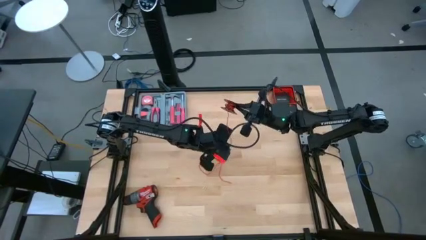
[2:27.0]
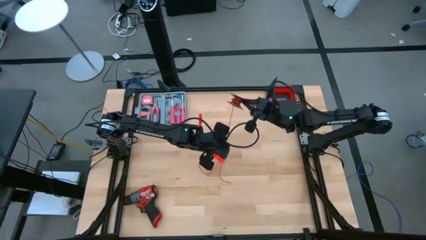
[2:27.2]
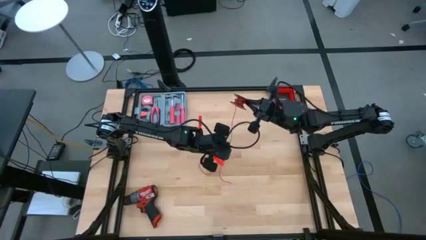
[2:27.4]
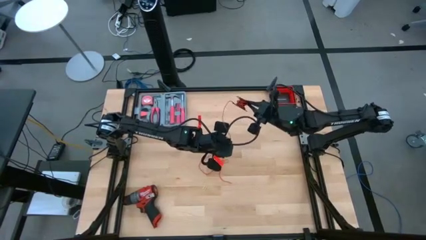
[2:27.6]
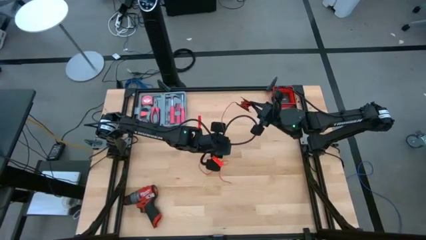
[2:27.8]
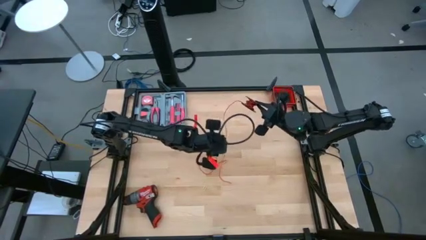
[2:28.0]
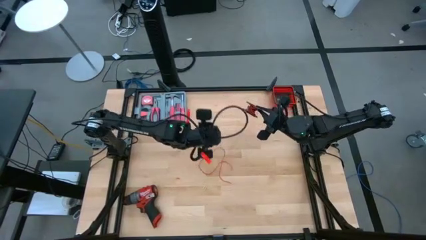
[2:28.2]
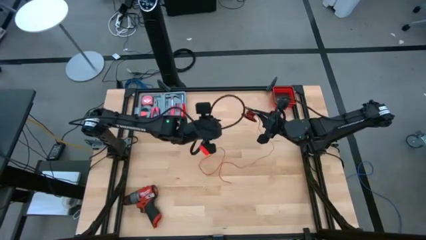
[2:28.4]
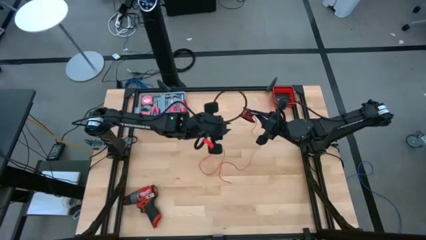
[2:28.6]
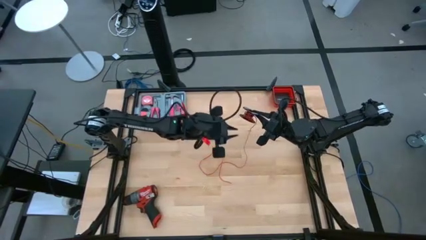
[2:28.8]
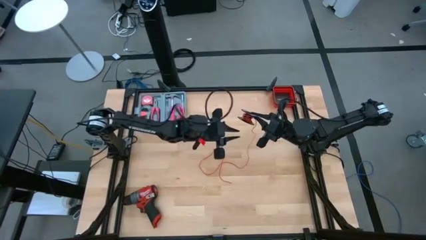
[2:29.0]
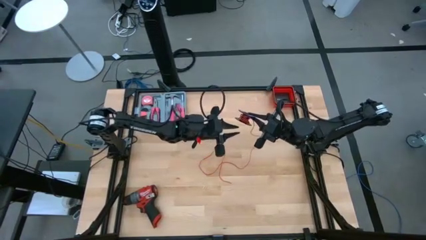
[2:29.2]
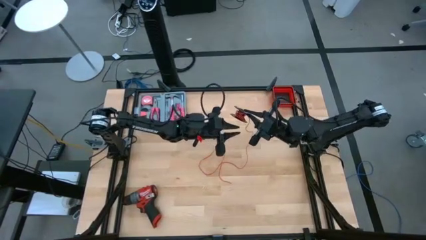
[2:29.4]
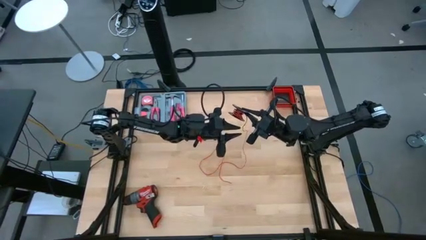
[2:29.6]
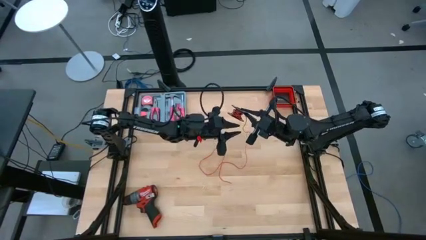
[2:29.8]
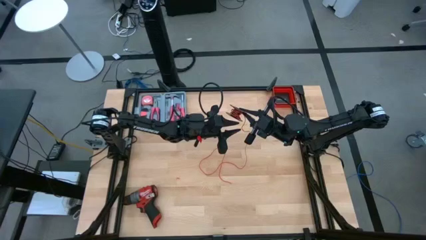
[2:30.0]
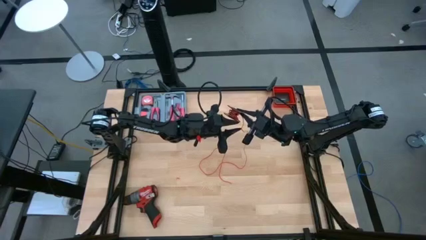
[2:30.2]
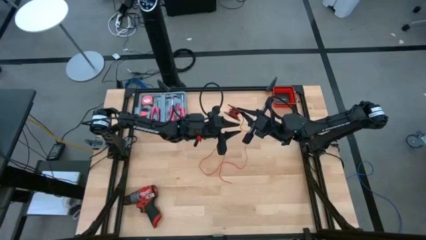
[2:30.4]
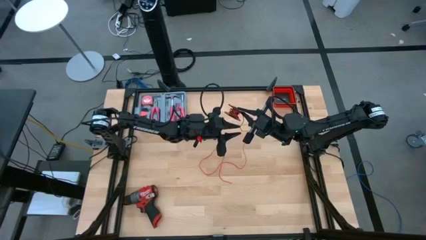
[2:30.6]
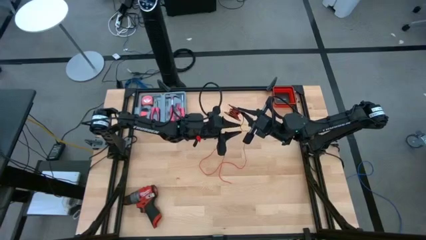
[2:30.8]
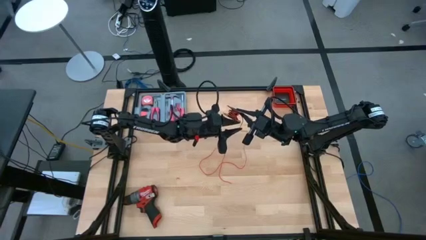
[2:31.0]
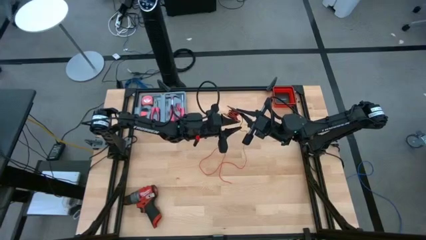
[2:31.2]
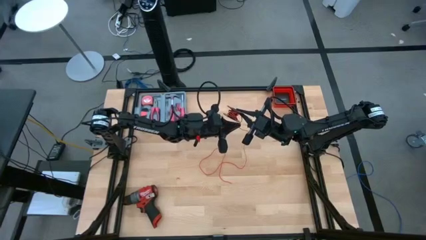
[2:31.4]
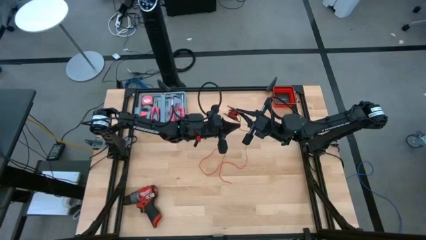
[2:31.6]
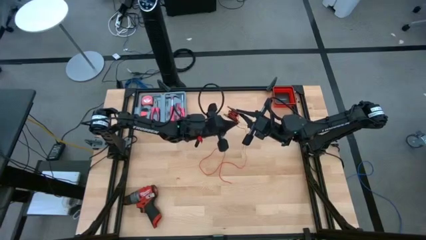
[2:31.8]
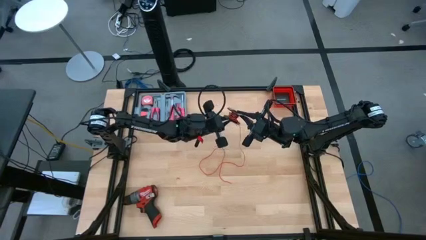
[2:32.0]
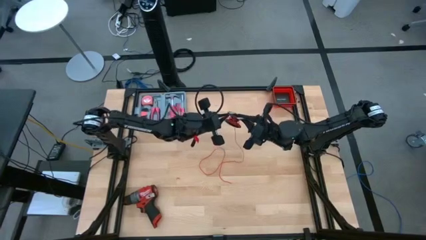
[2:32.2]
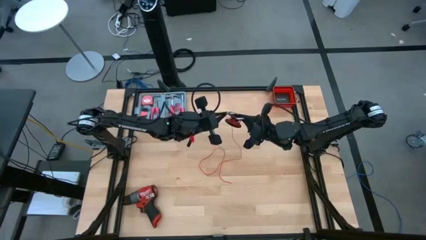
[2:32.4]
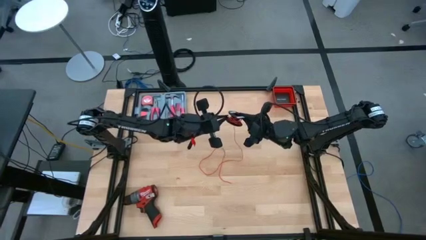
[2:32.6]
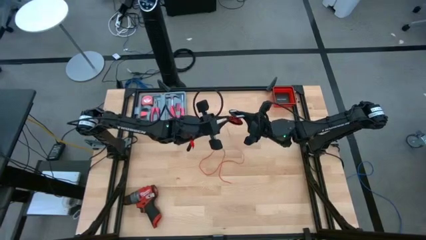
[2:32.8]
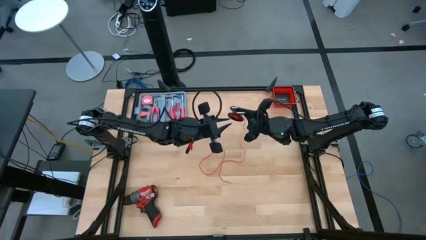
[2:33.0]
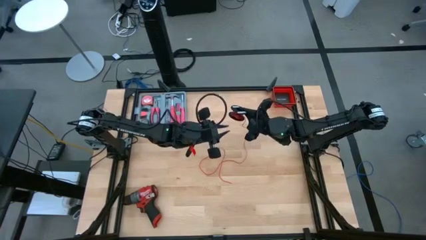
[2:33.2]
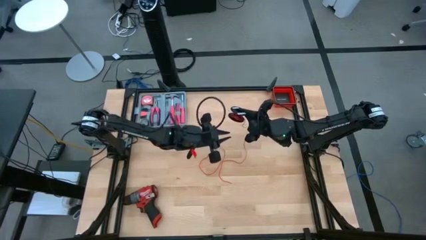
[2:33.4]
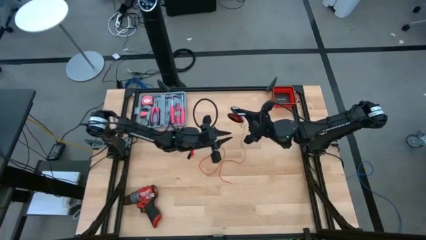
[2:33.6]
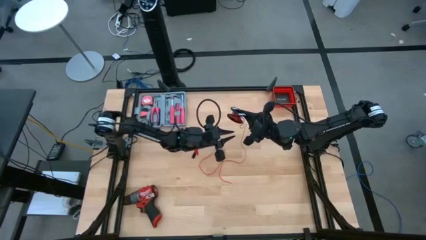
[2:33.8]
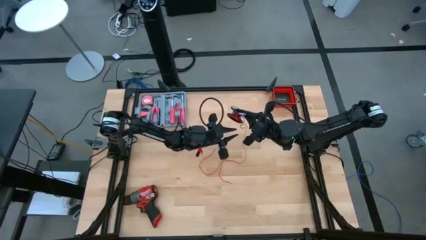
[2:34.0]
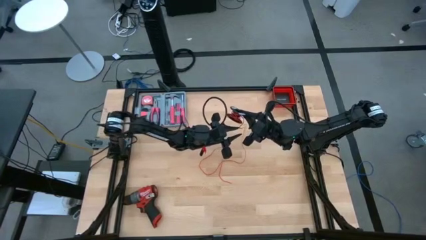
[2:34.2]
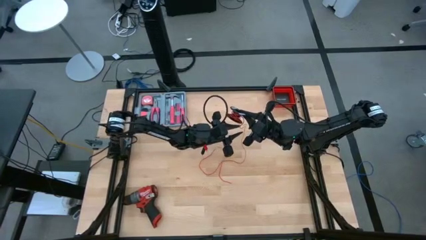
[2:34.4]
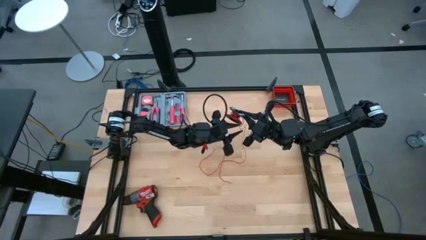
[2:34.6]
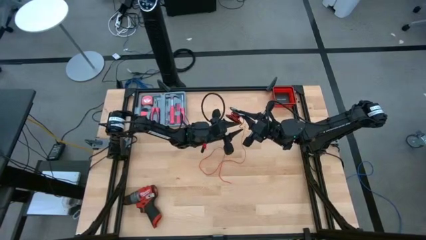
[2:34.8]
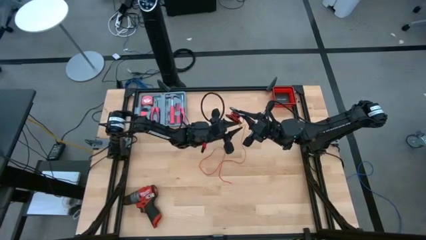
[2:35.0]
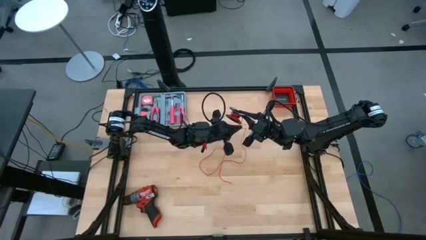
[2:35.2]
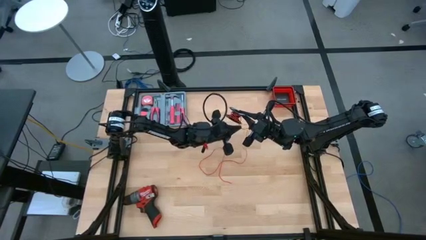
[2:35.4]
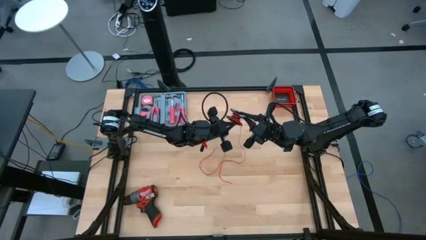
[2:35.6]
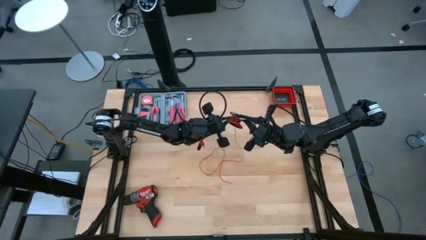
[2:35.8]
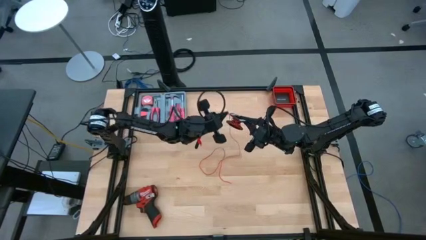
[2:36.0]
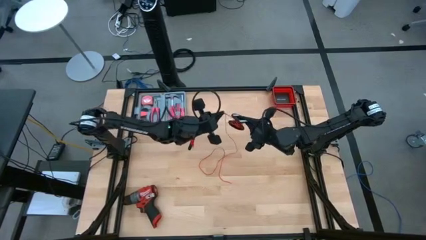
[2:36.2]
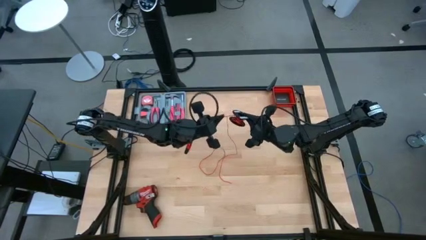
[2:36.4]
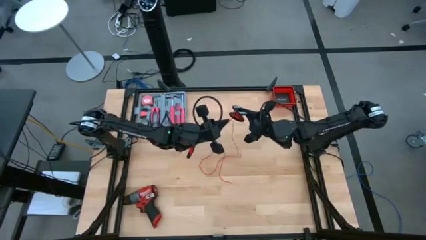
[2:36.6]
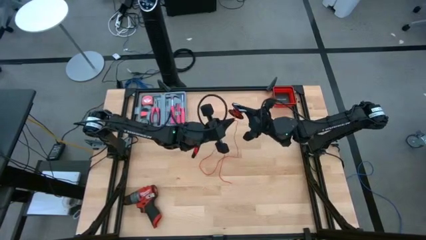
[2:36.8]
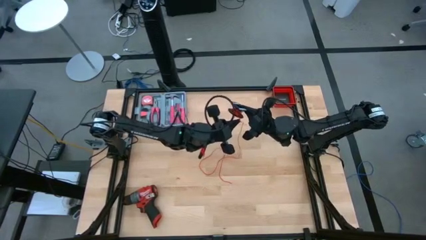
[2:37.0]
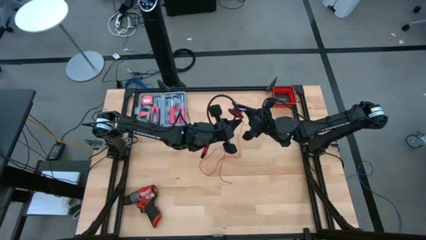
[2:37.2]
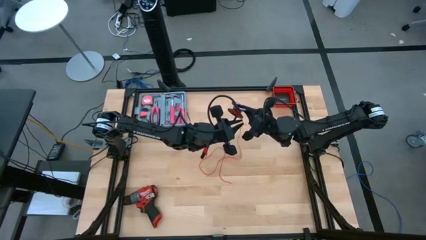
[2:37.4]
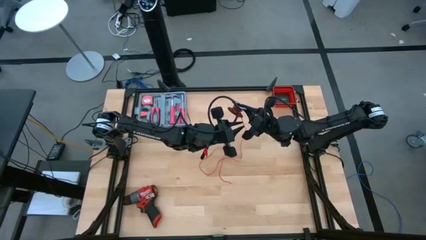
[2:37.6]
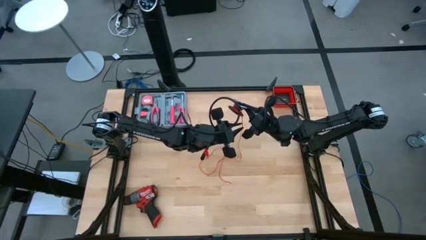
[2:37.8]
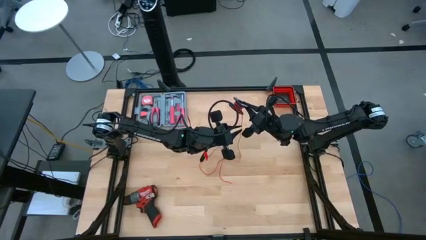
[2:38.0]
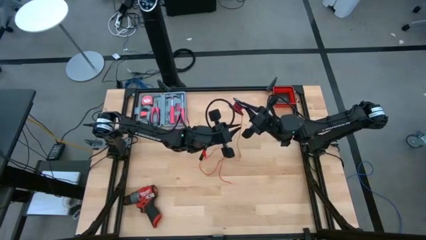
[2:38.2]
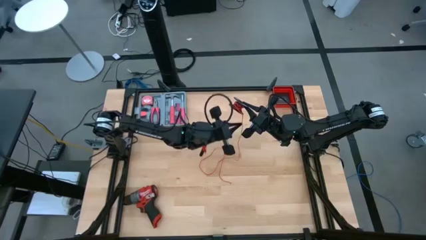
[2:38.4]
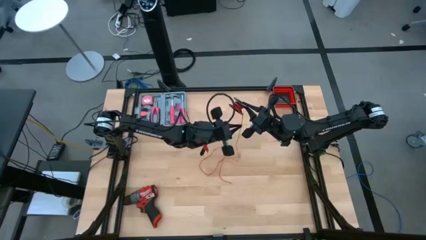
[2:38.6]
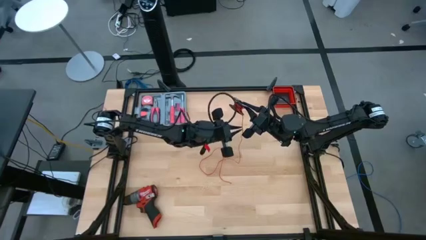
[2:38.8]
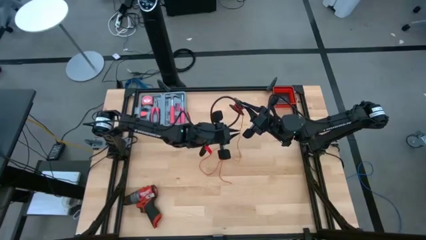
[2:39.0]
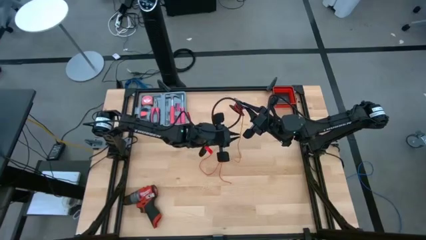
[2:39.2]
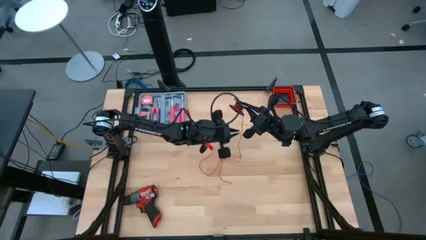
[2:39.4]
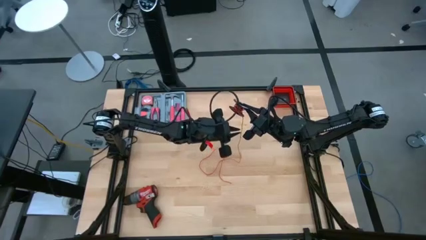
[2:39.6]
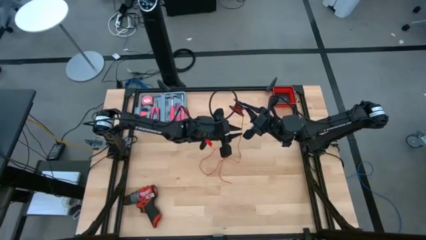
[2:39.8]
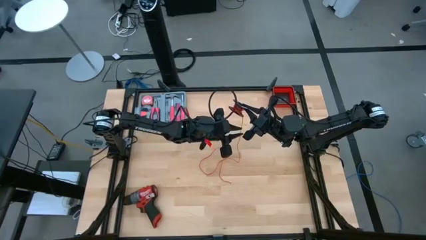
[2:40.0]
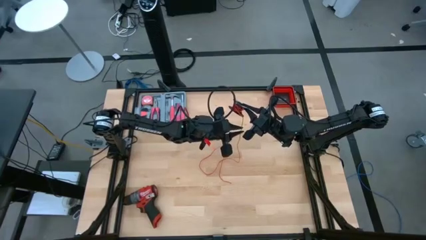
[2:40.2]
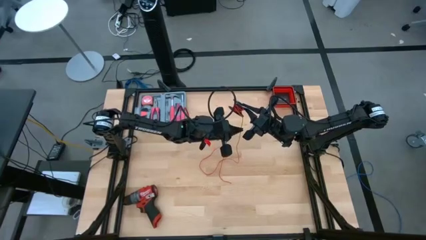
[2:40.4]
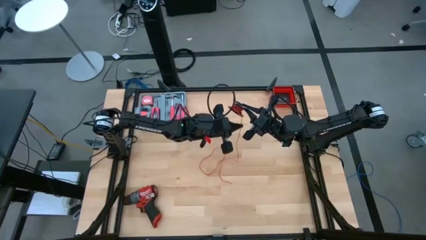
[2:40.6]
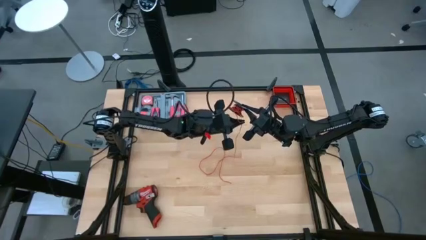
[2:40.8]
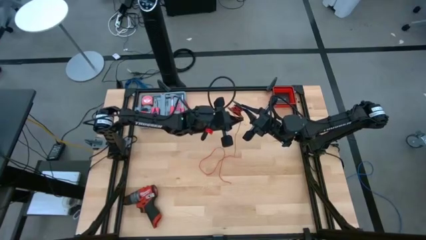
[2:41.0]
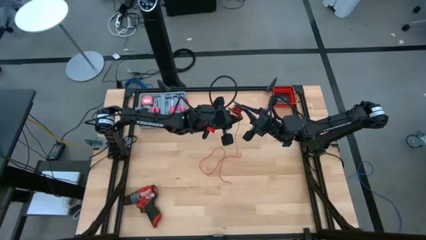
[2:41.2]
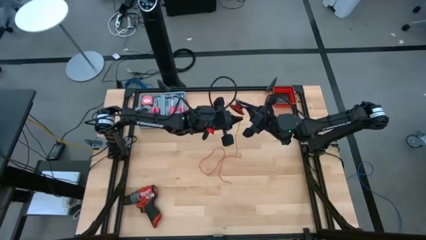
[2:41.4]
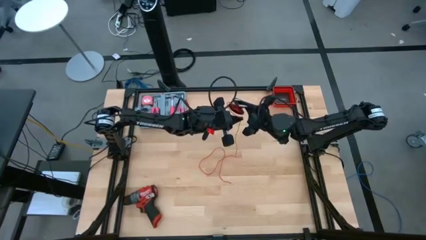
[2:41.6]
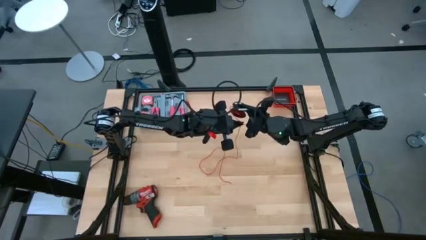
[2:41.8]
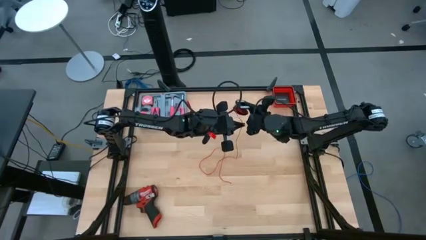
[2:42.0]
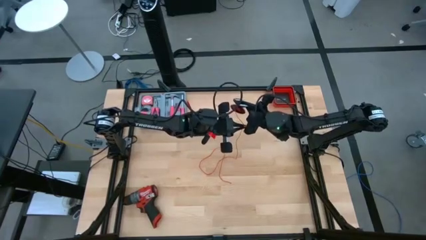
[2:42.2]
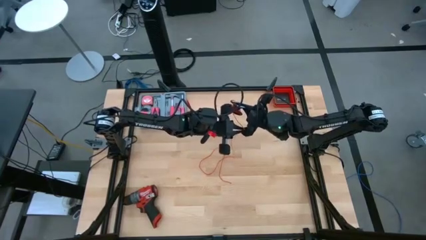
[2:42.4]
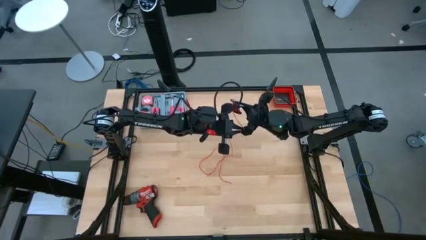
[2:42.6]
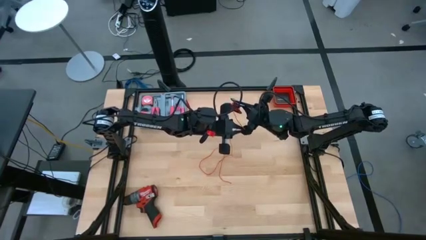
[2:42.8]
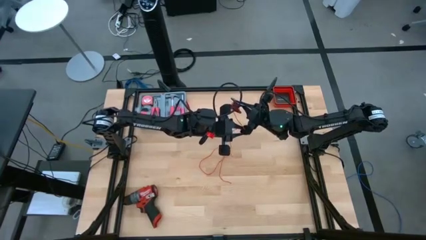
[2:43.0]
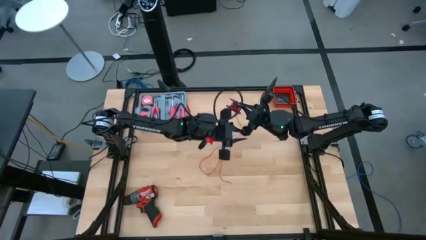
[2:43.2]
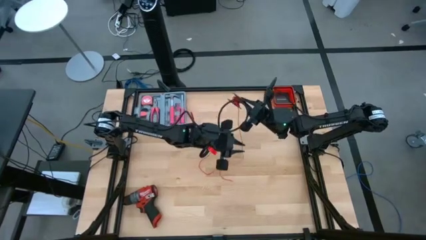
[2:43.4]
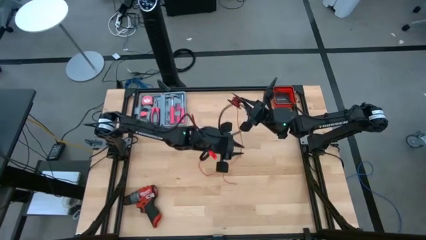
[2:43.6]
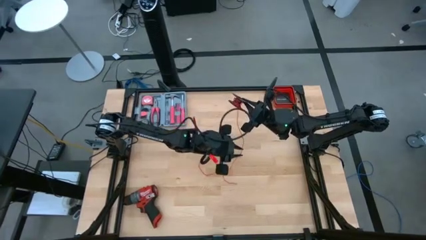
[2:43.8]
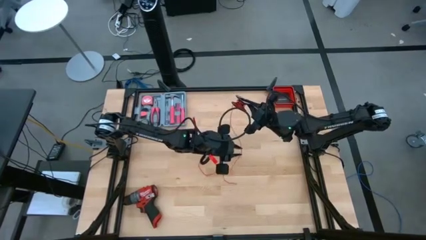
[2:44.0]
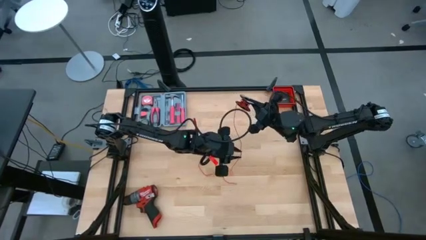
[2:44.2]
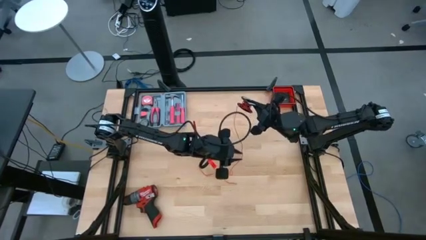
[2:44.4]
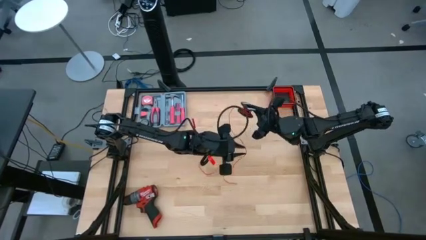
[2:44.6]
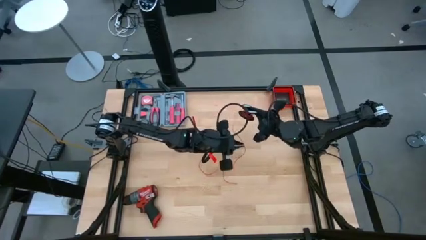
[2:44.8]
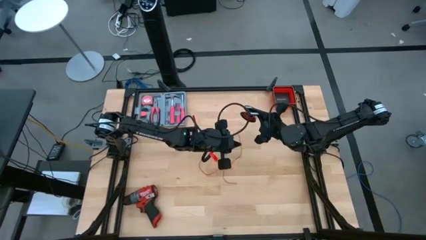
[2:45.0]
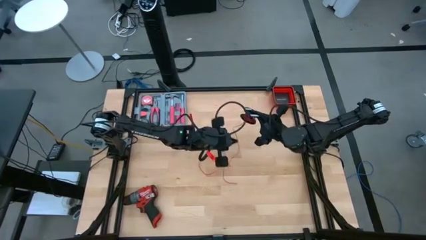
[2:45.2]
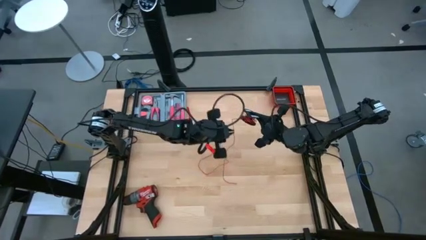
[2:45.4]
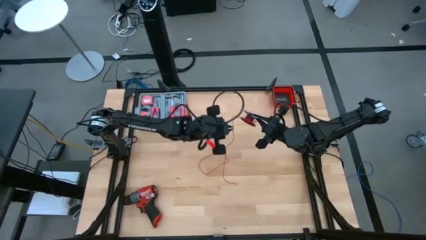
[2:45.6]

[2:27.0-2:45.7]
Task: Coil cords
Coil the red wire on the black spool
